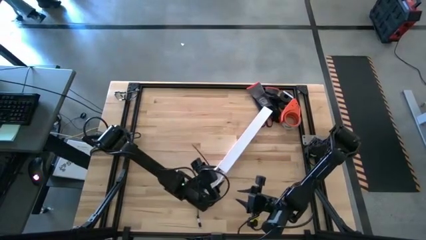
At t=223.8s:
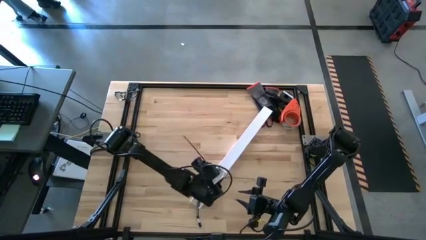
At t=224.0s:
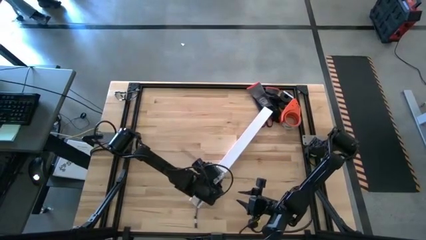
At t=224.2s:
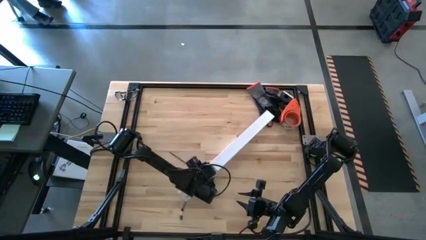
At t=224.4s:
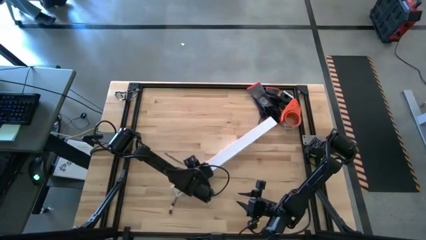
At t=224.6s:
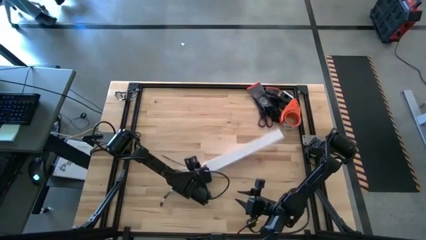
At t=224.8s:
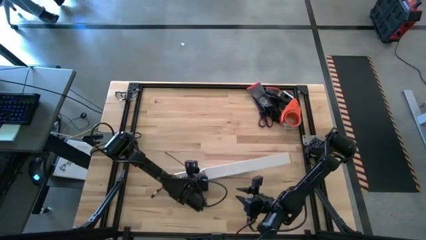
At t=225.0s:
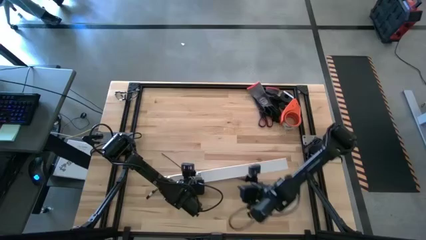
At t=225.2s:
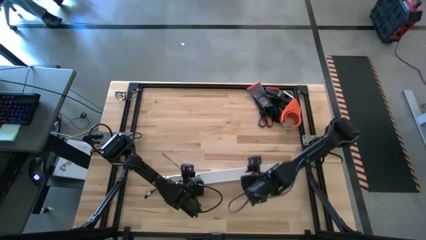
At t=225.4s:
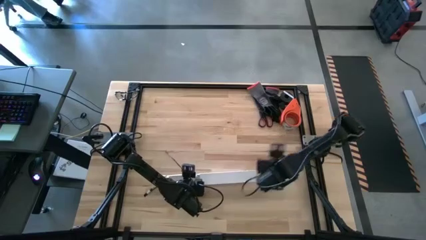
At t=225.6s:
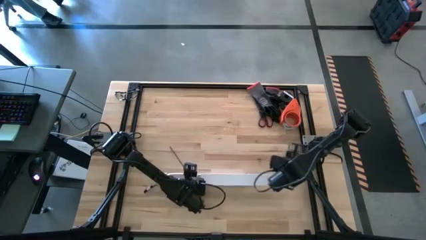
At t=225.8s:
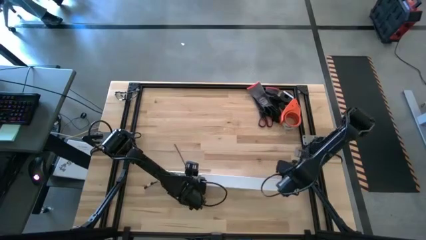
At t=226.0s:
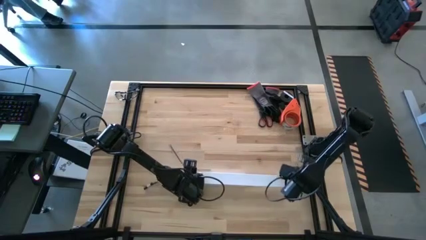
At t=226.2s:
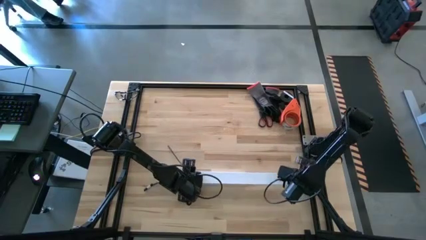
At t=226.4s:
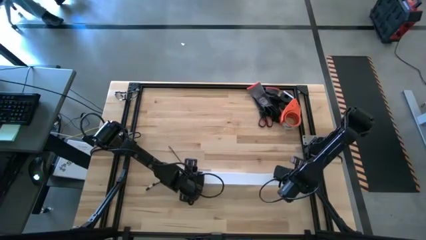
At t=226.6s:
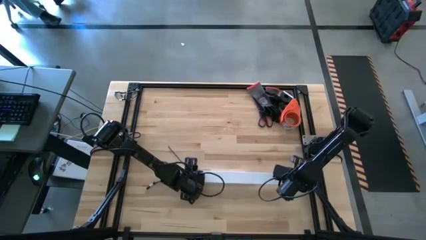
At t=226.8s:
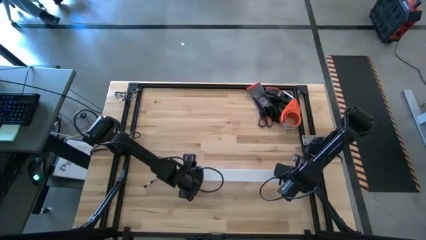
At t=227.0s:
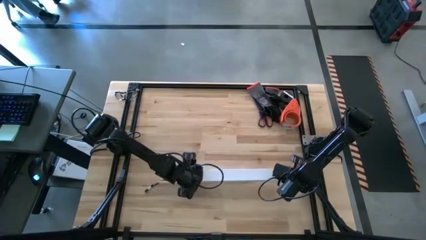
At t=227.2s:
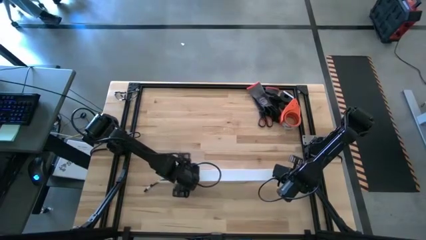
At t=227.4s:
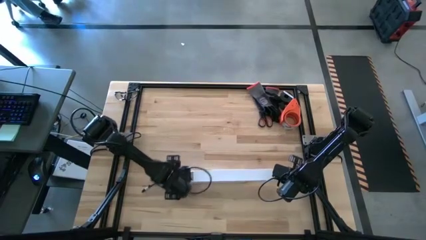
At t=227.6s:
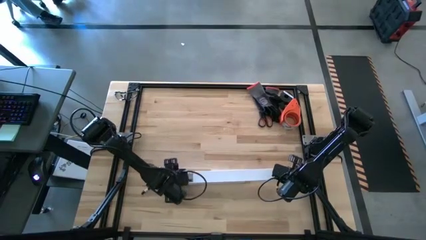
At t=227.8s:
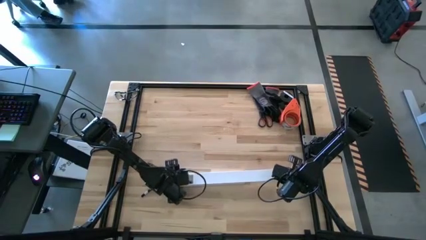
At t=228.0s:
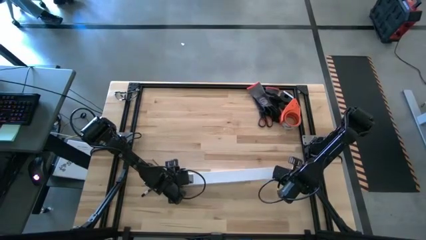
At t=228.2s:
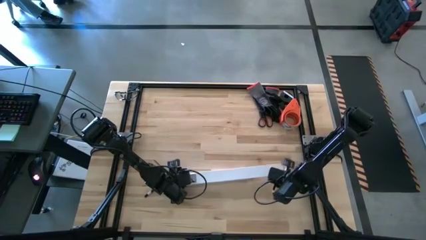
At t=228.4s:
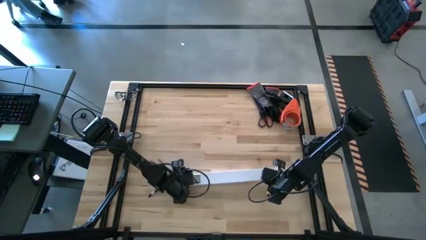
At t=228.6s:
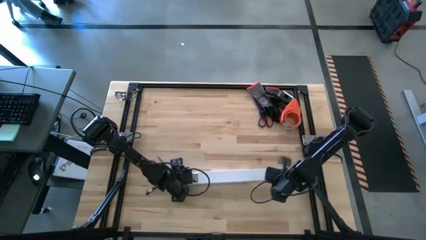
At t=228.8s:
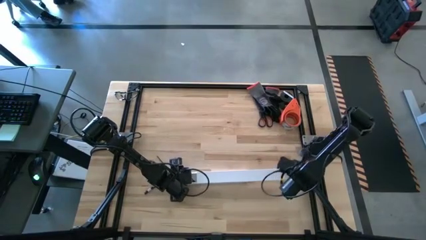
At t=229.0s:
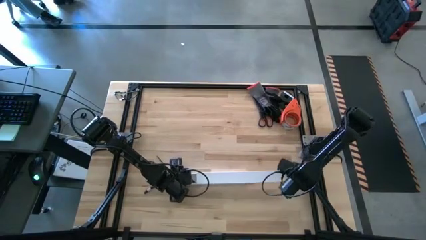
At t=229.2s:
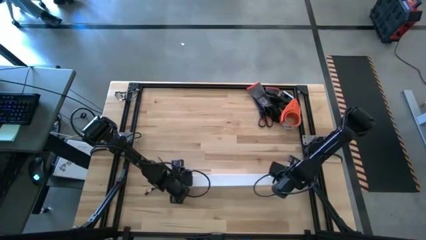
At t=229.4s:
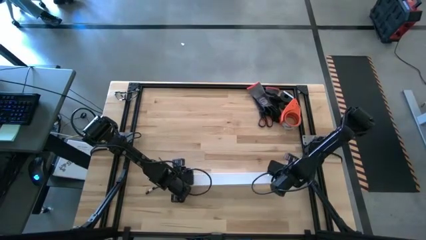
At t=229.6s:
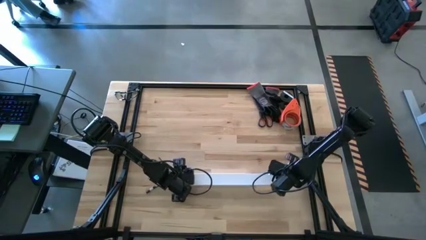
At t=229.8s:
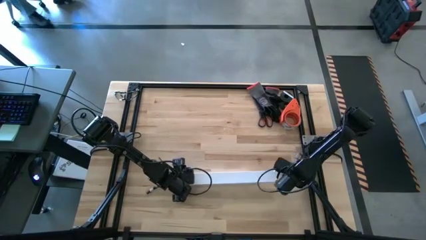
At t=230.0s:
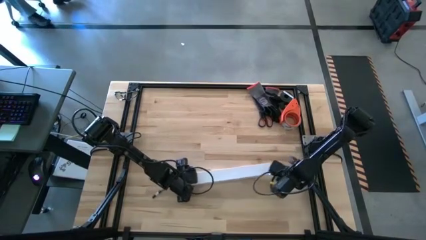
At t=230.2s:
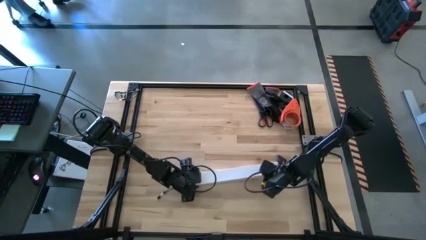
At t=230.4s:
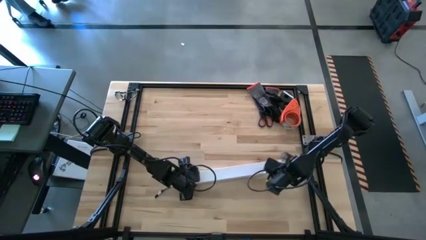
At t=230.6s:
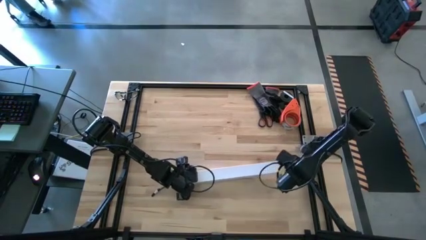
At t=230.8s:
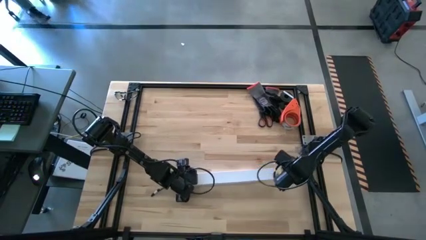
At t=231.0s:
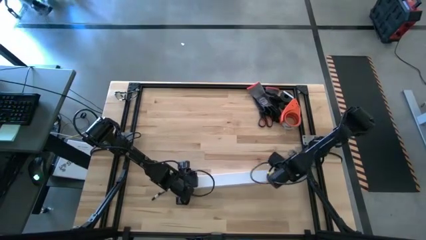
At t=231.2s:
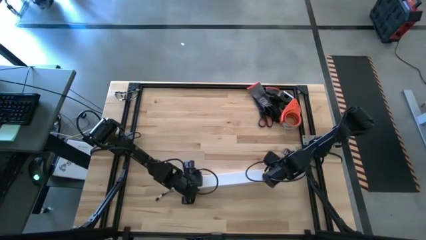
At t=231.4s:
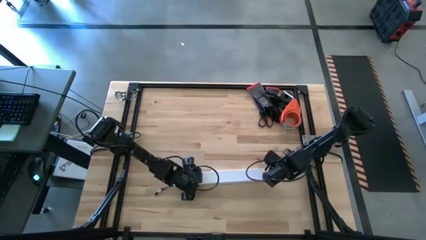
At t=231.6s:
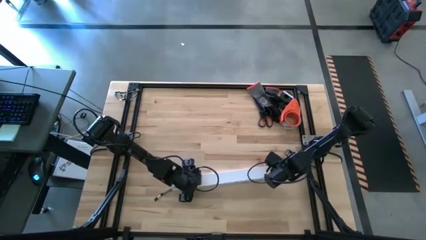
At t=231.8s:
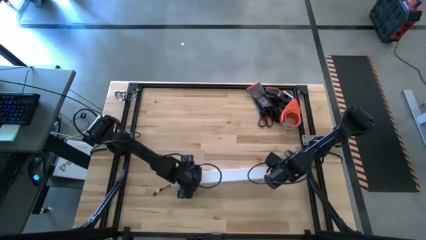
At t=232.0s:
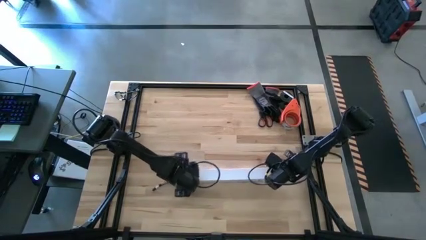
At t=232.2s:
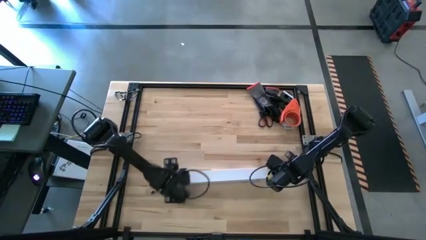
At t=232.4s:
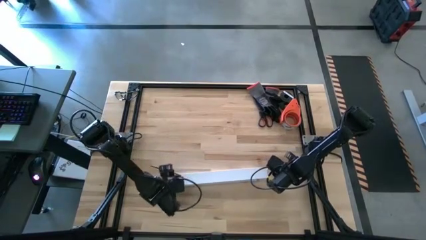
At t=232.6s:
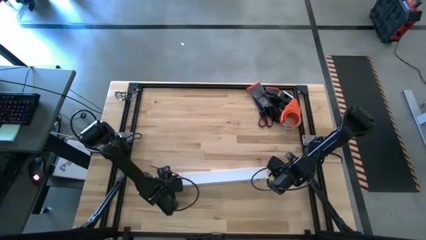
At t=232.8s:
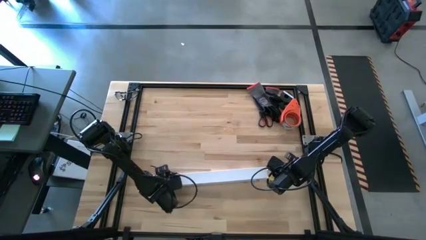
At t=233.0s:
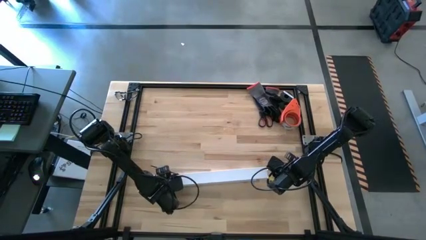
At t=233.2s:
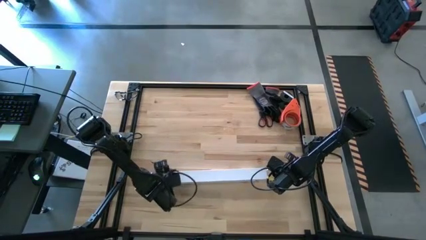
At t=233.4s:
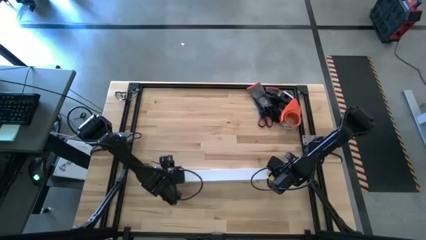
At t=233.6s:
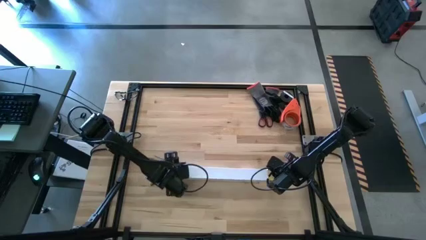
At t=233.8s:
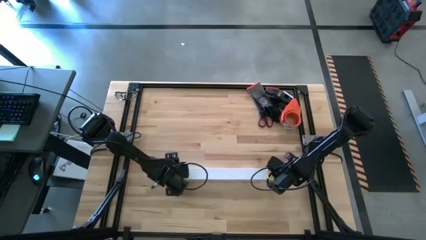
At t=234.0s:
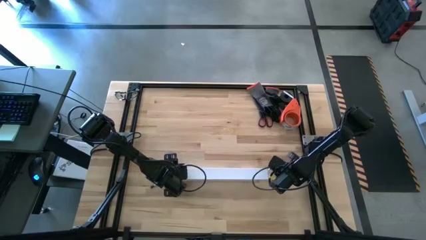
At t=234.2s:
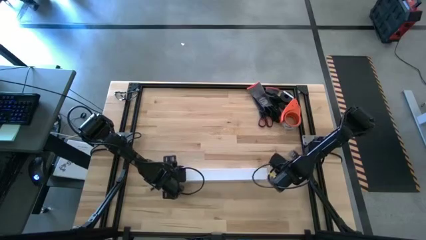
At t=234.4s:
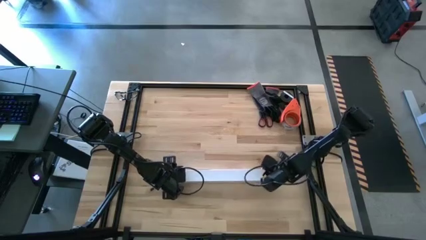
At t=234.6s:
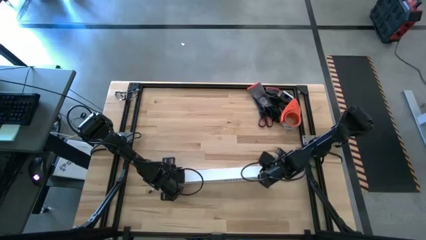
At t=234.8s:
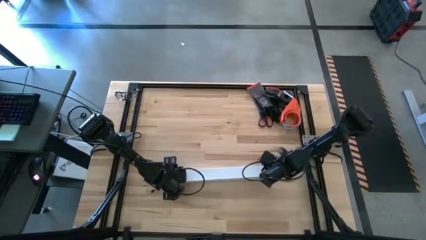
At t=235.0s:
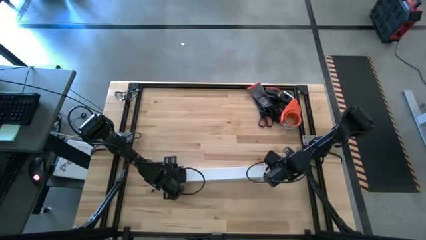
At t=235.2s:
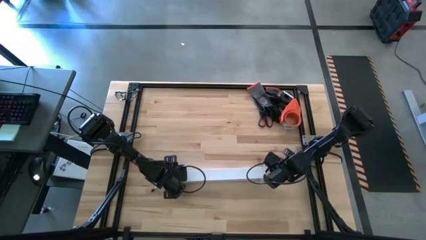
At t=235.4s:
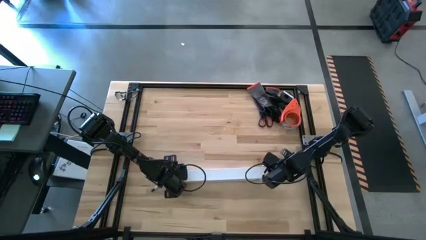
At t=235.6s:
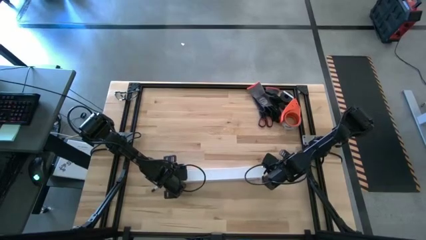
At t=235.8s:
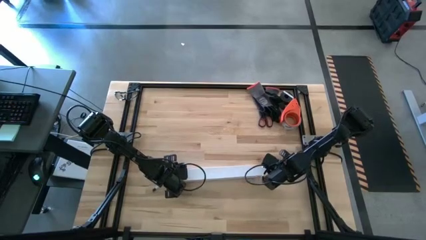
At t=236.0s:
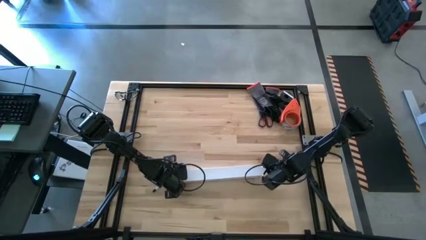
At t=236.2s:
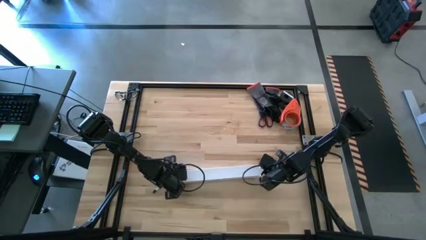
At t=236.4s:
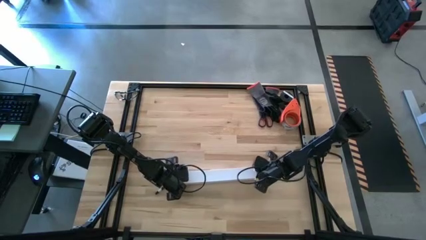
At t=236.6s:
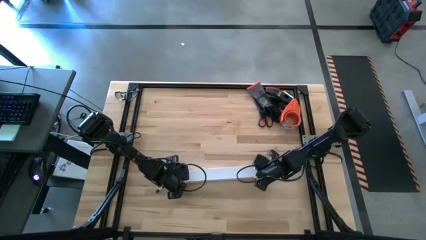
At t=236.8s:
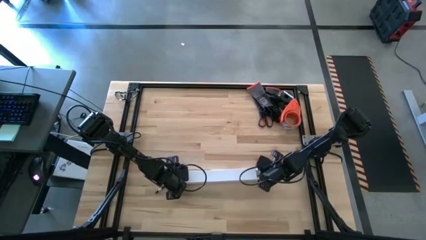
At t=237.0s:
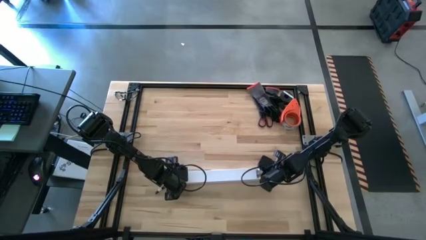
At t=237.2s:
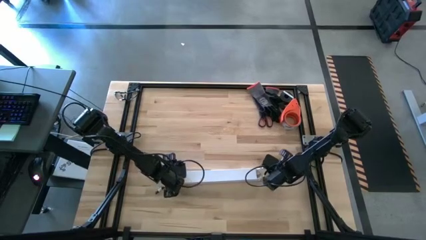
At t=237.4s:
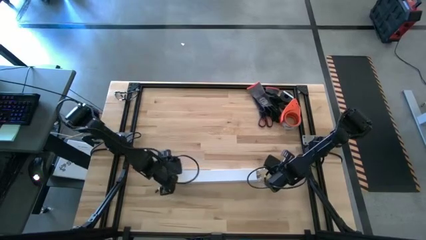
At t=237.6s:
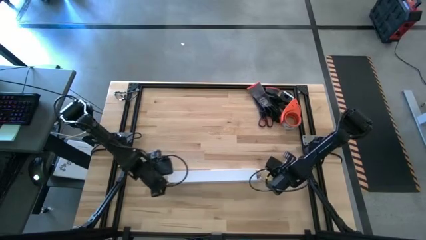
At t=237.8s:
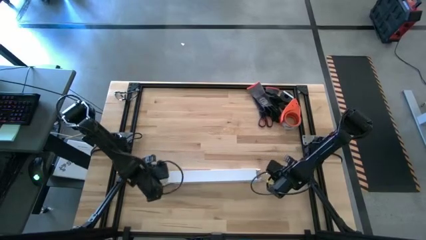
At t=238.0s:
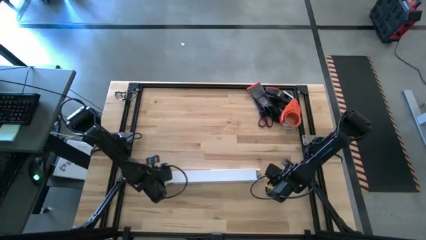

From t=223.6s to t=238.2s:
Task: Ziptie cables
Close the white cable duct
